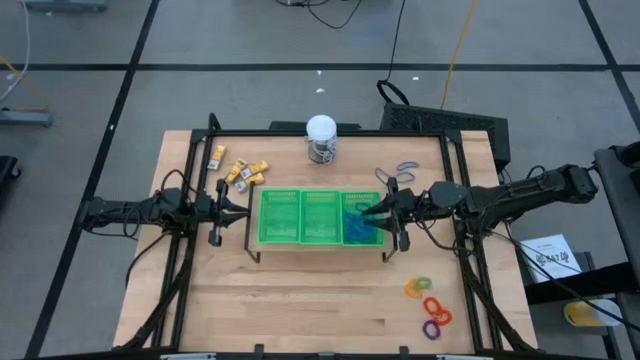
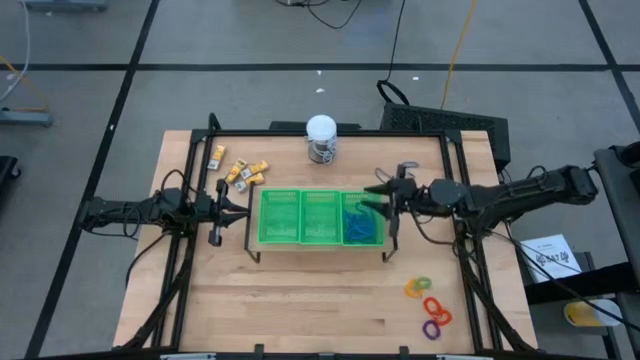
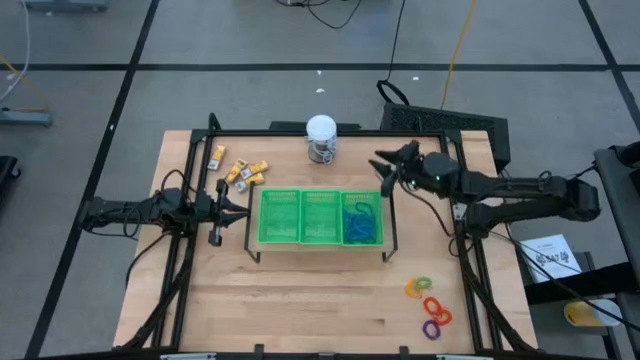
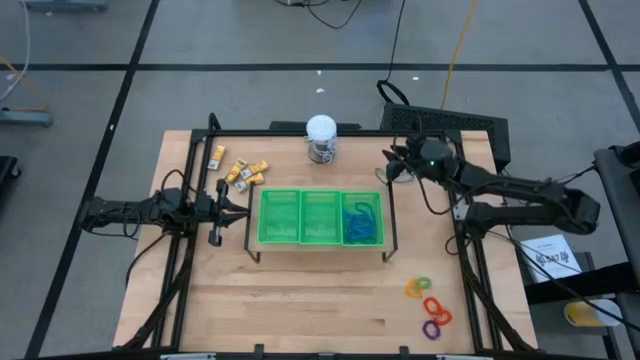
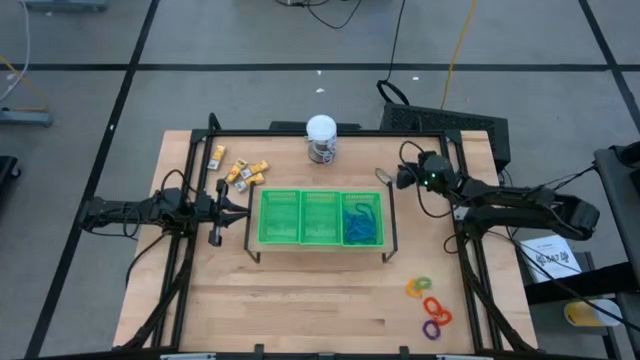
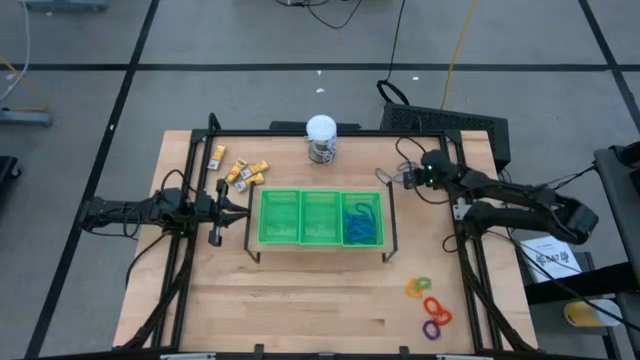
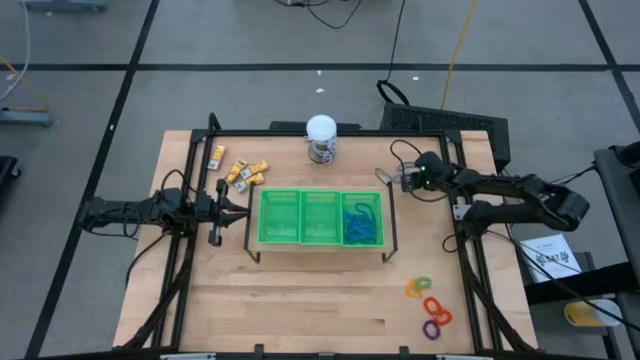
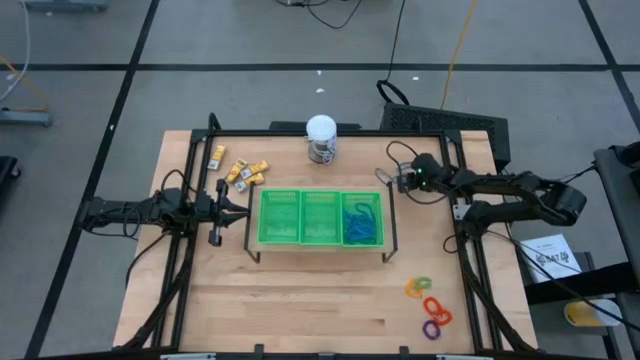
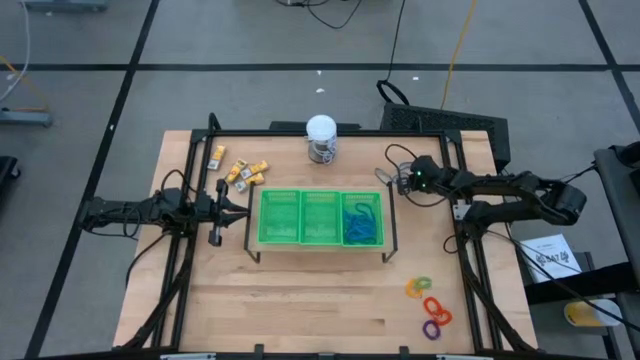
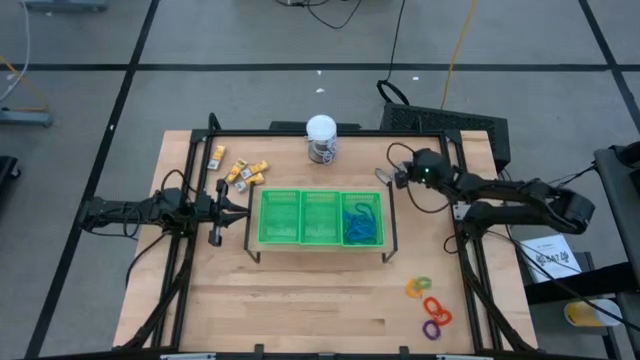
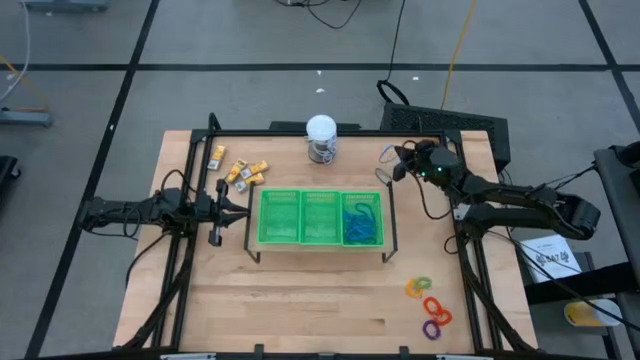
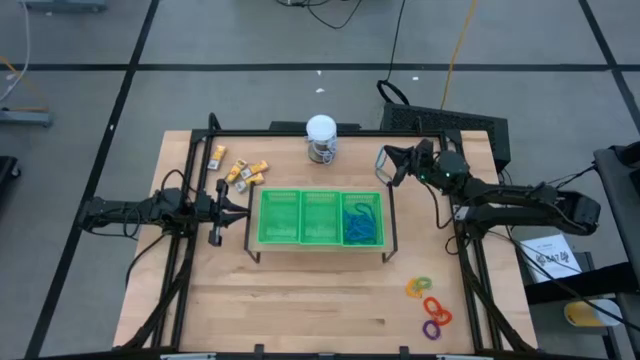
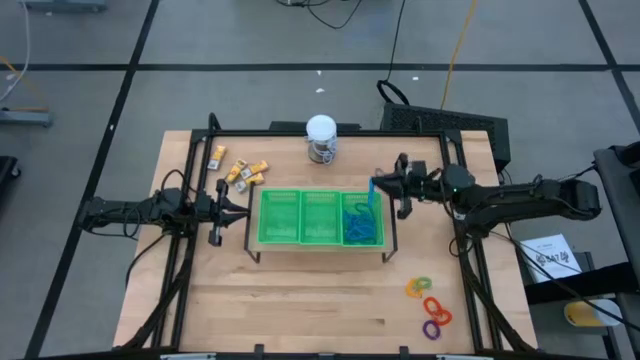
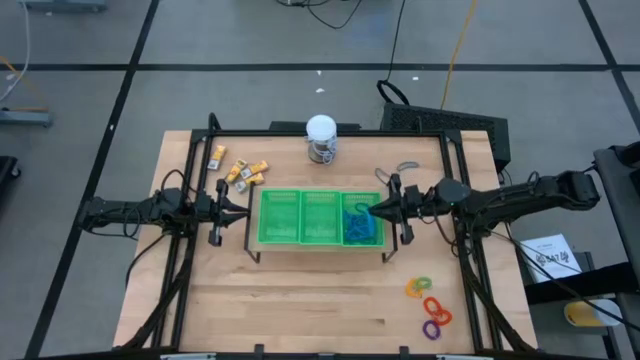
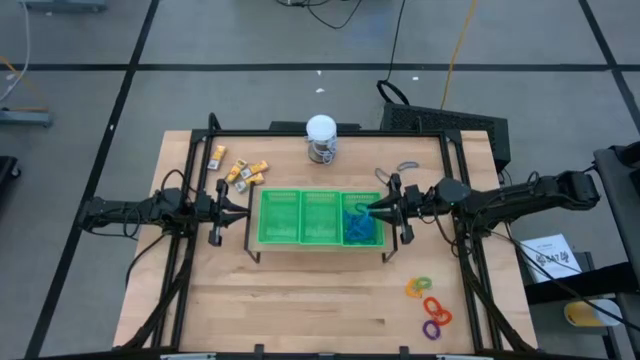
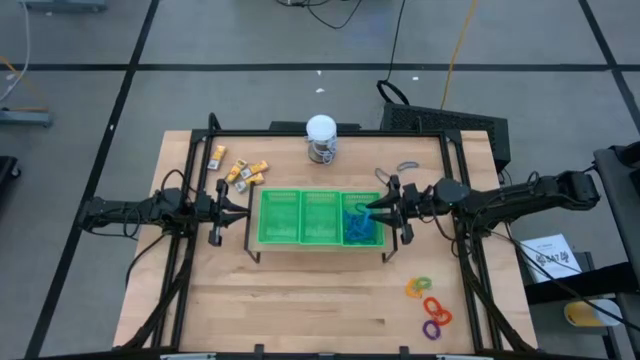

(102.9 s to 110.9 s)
Task: Pick & Place Office Desk Supplies
Put the blue rubber band into the right green bin on the shelf

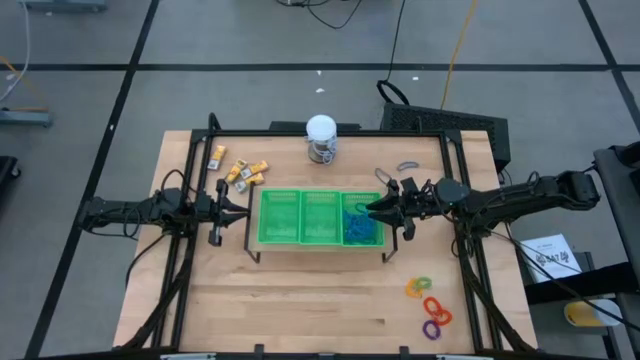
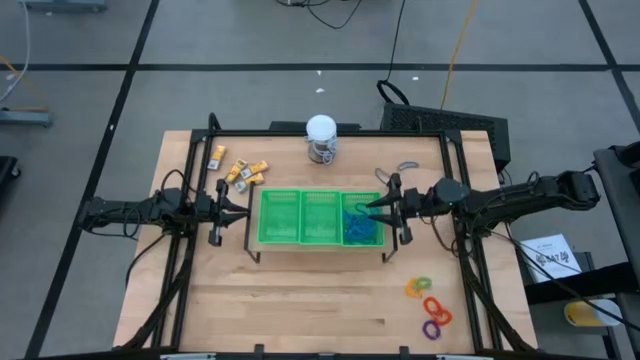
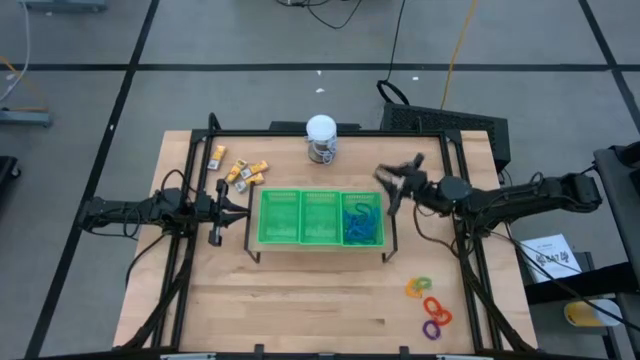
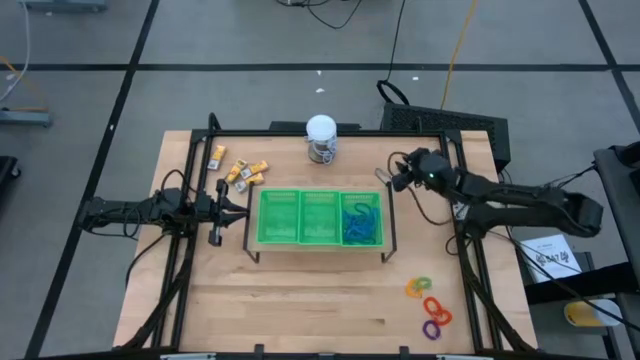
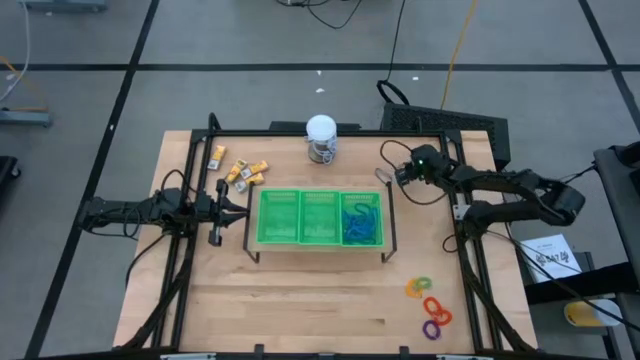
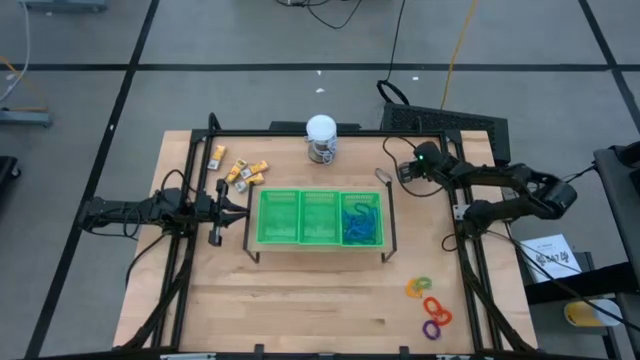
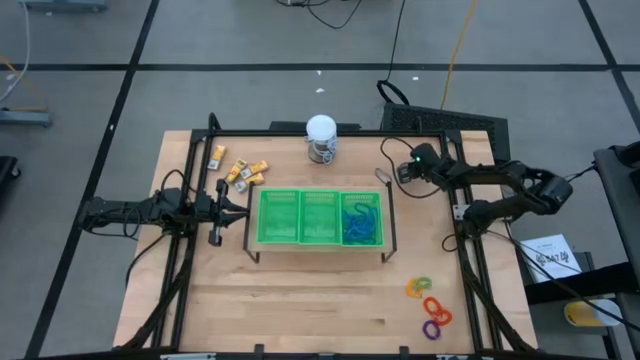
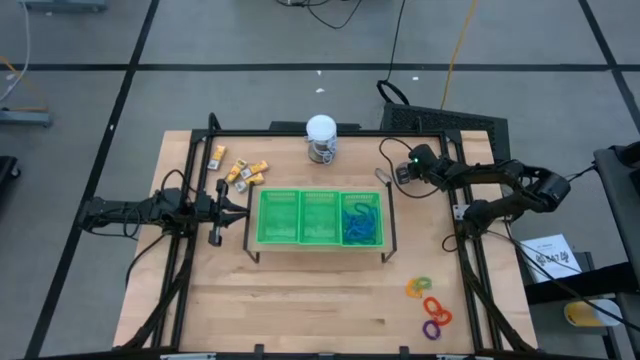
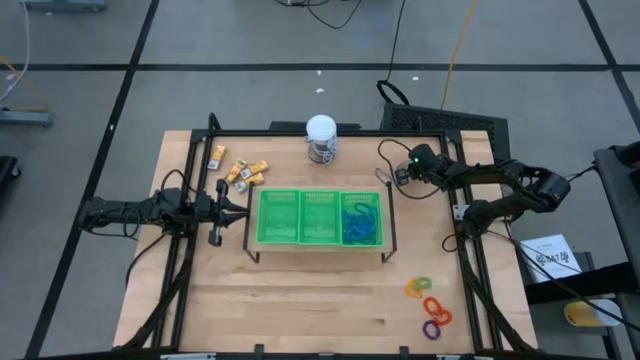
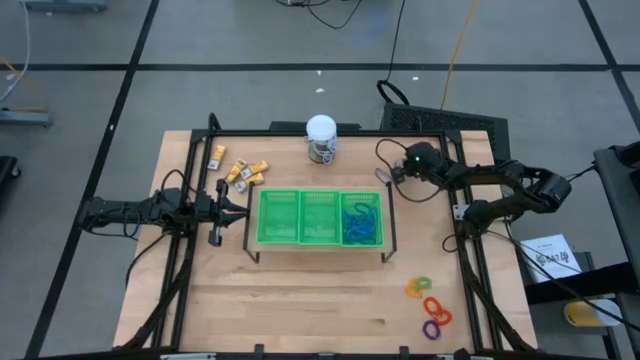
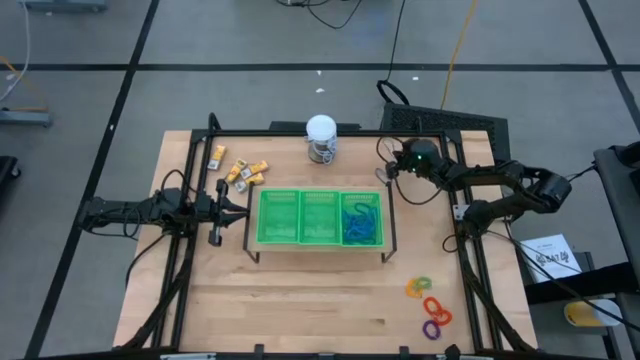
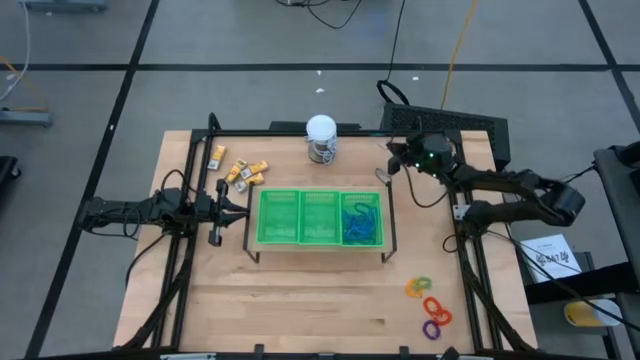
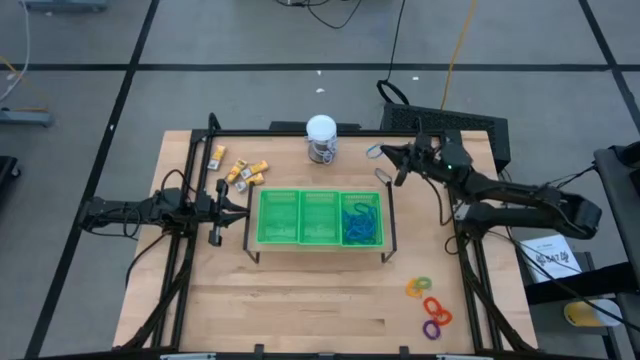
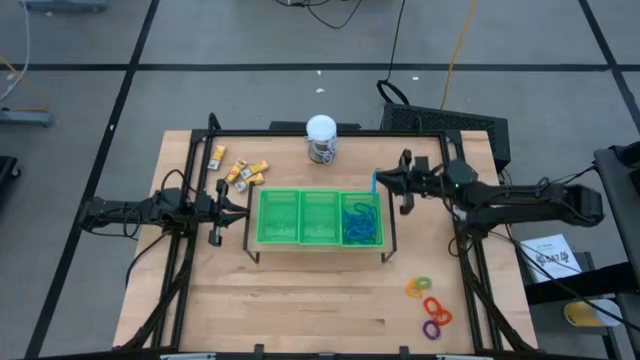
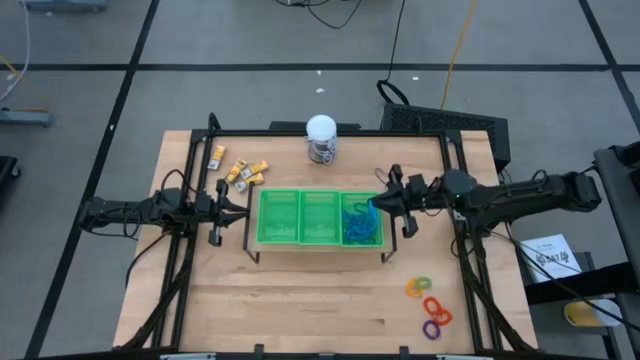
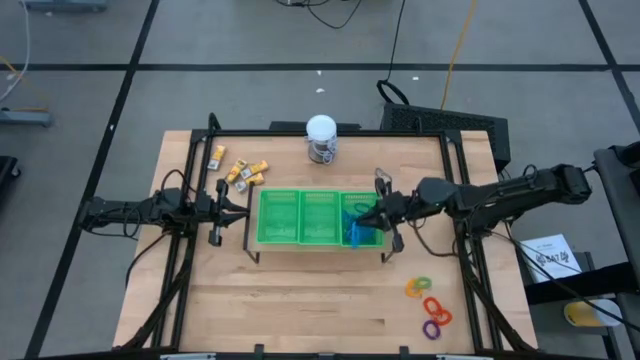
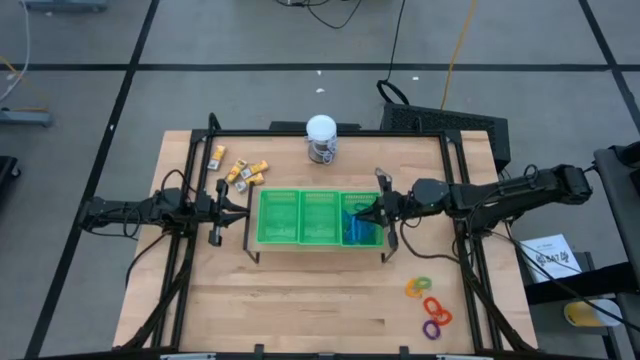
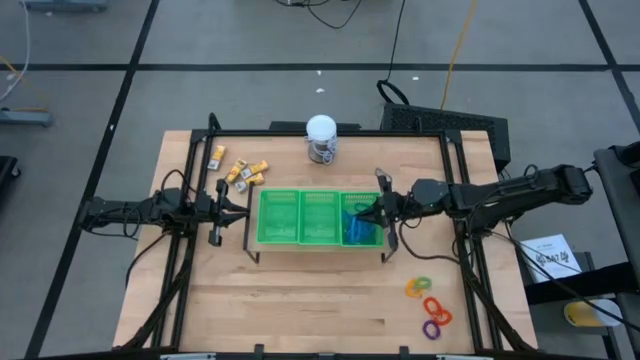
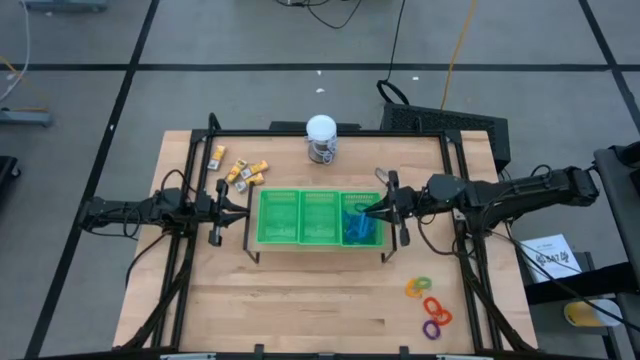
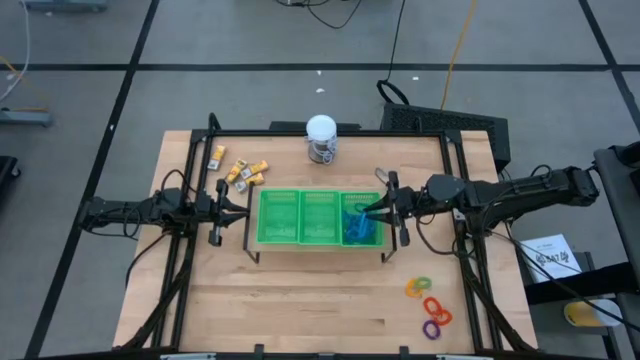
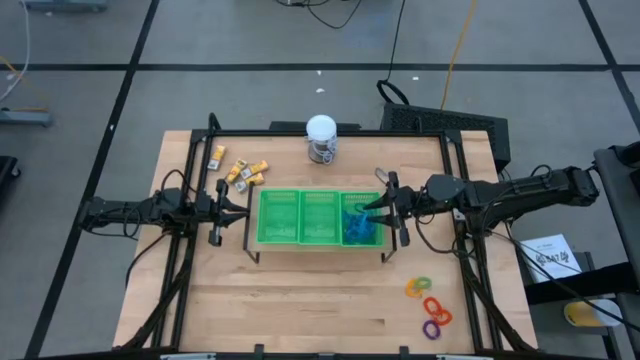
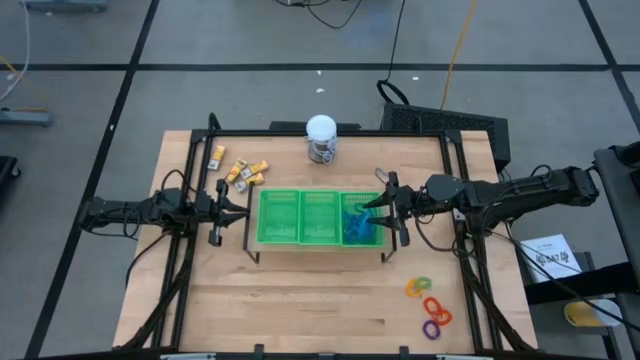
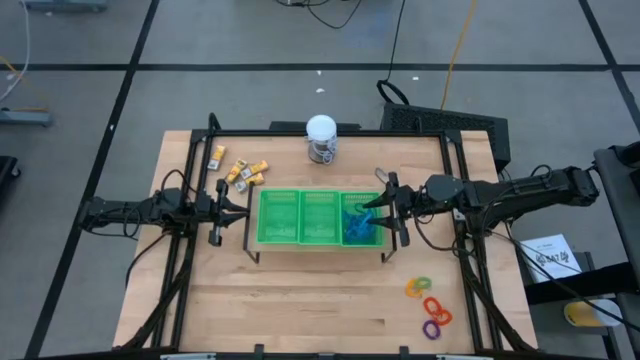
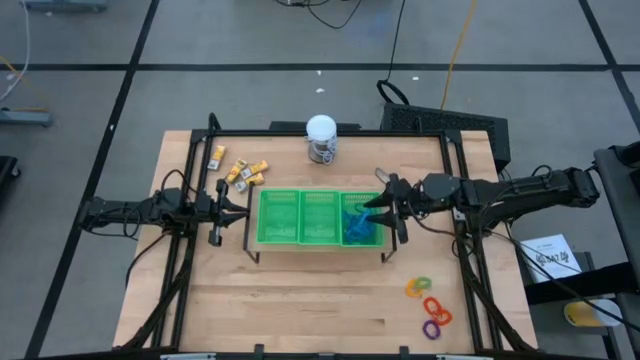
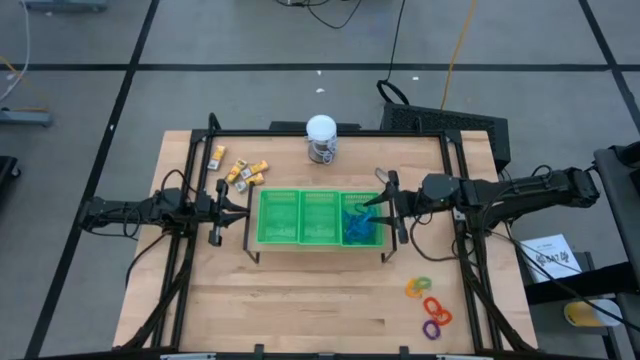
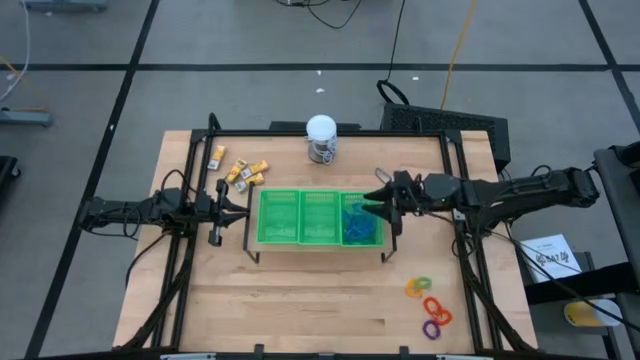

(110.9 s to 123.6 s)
Put the blue rubber band into the right green bin on the shelf

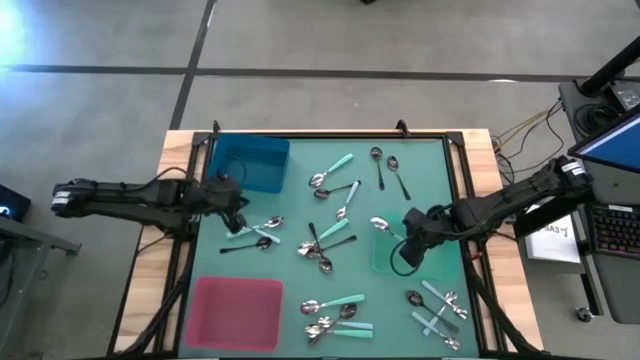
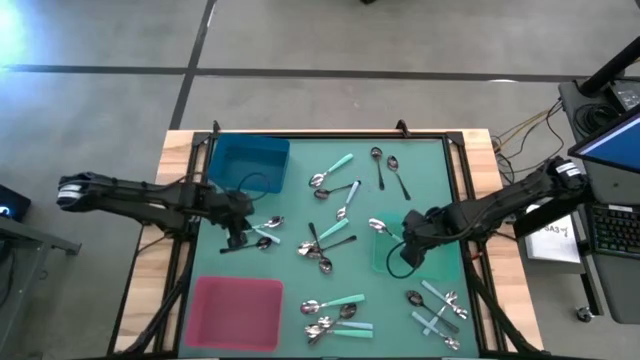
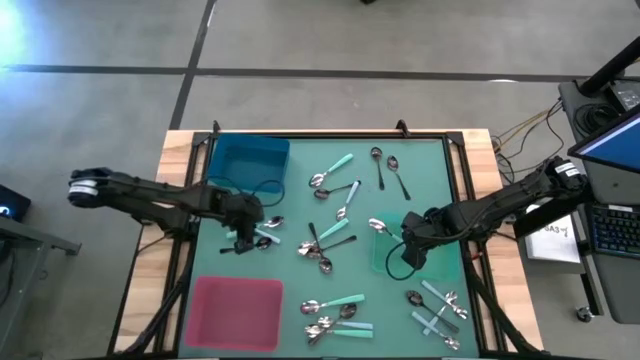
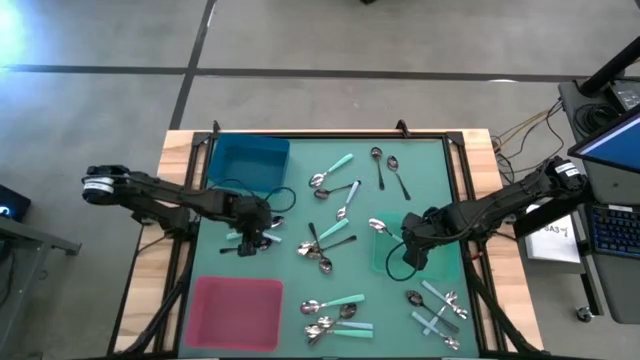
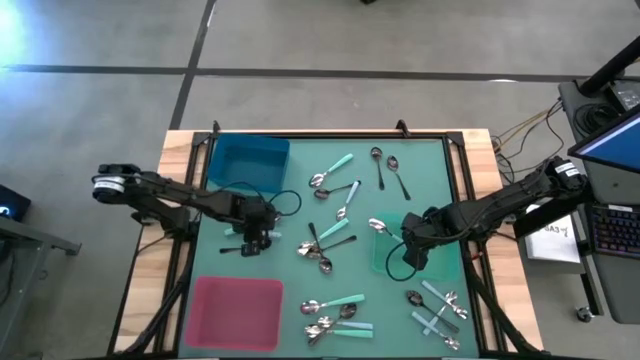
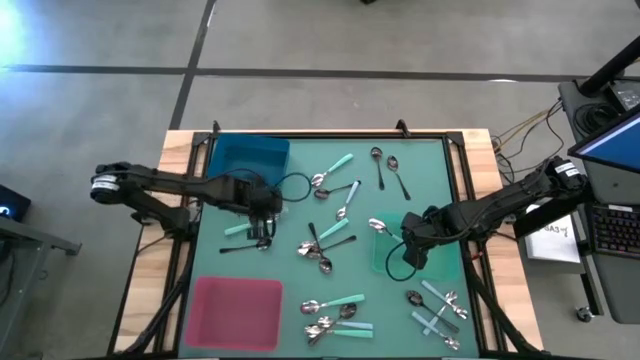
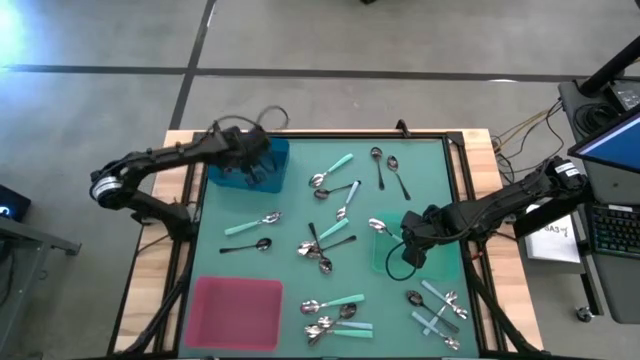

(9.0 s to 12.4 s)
Task: Sort silverware by color (type)
Put the blue spoon into the blue bin
